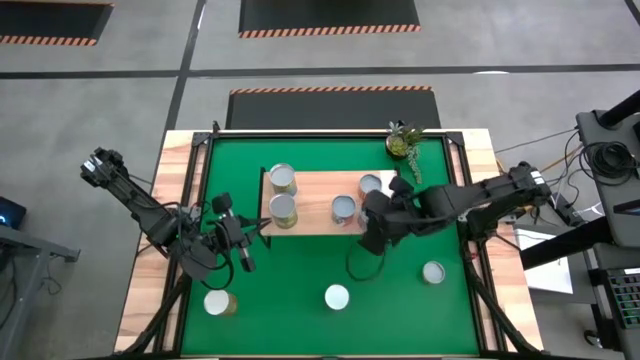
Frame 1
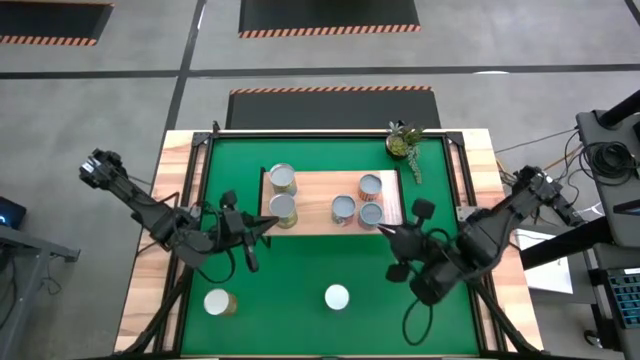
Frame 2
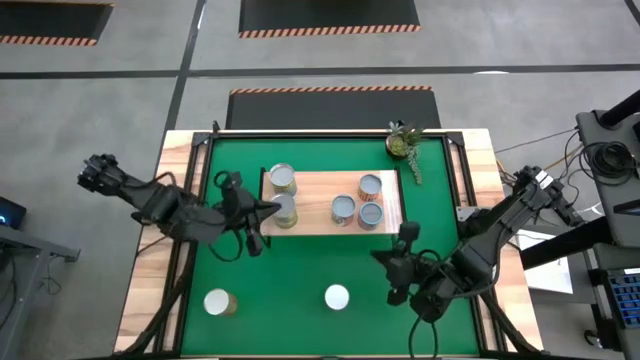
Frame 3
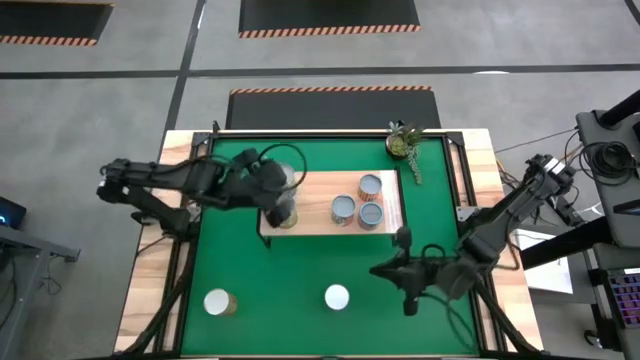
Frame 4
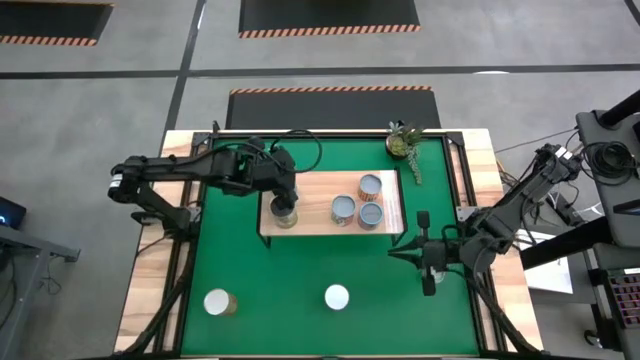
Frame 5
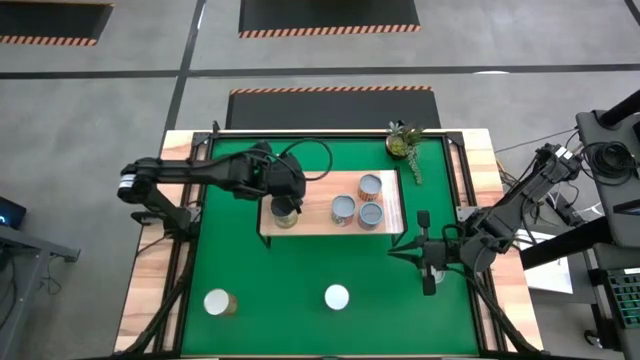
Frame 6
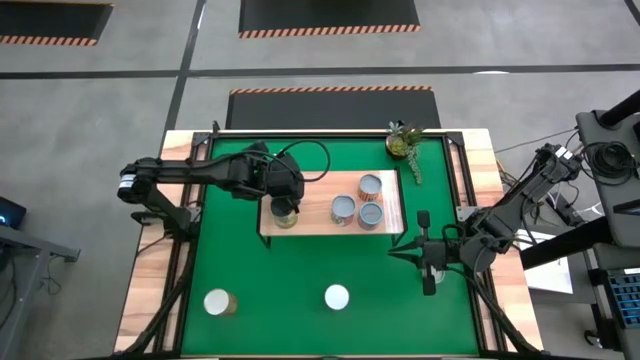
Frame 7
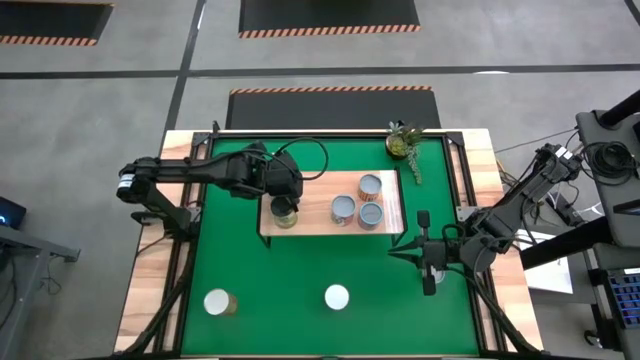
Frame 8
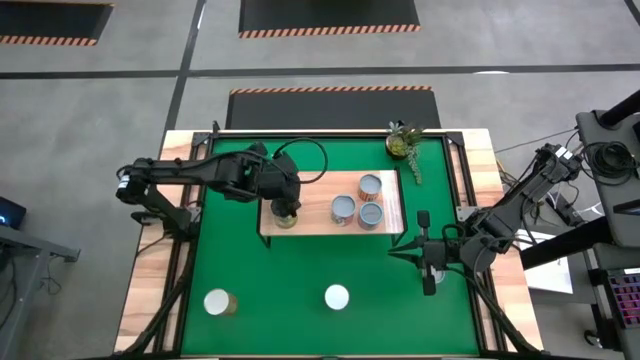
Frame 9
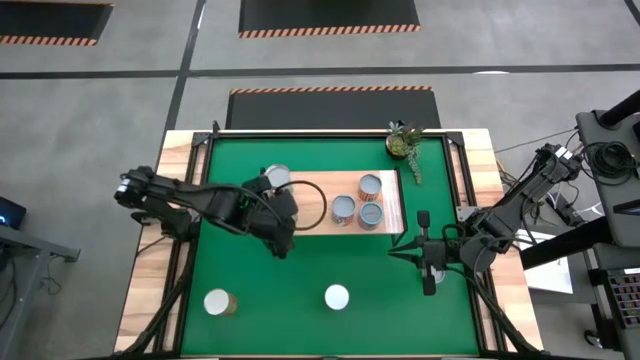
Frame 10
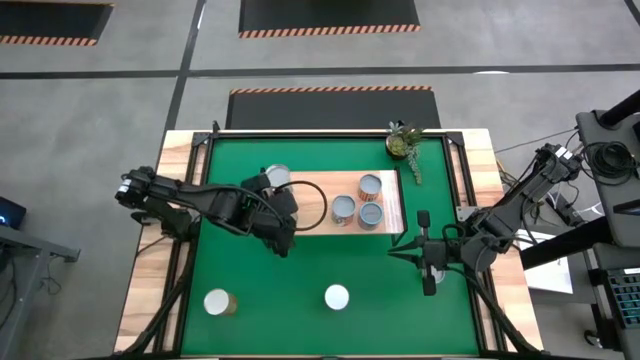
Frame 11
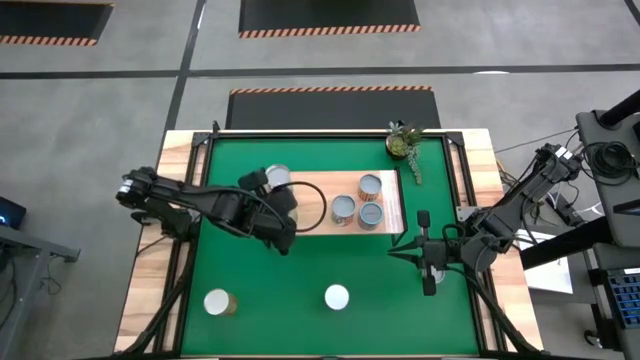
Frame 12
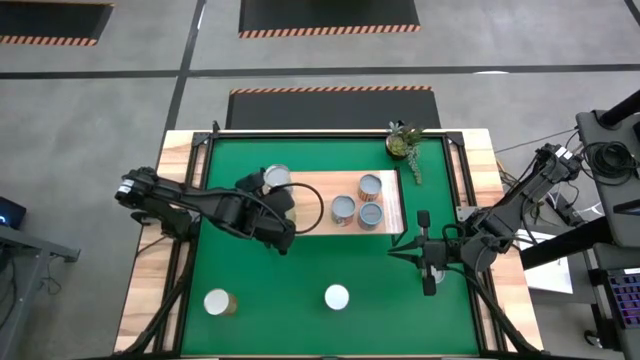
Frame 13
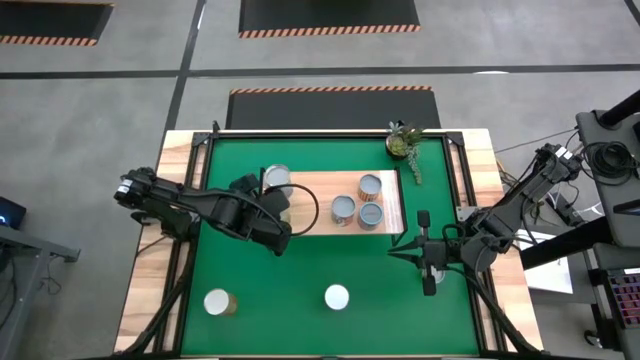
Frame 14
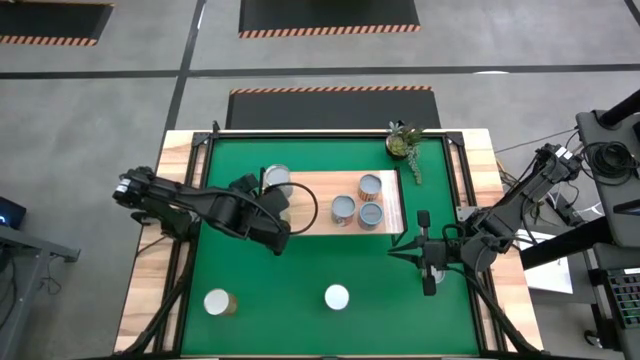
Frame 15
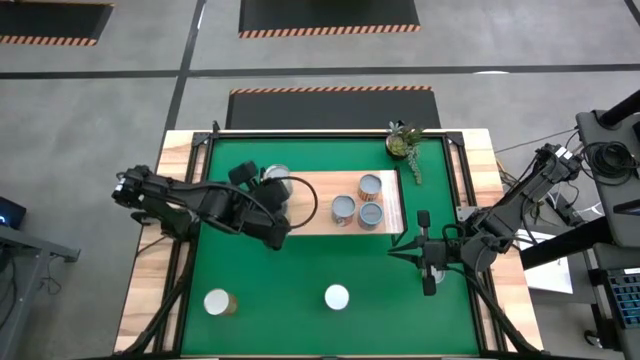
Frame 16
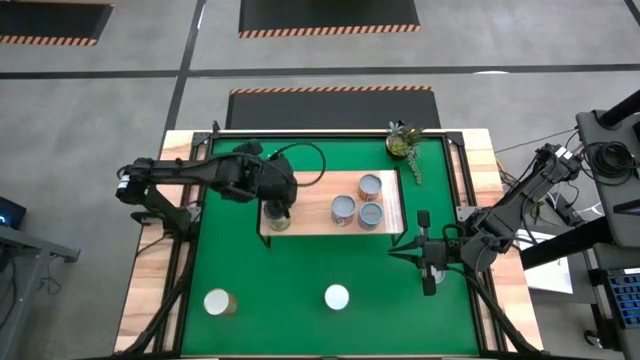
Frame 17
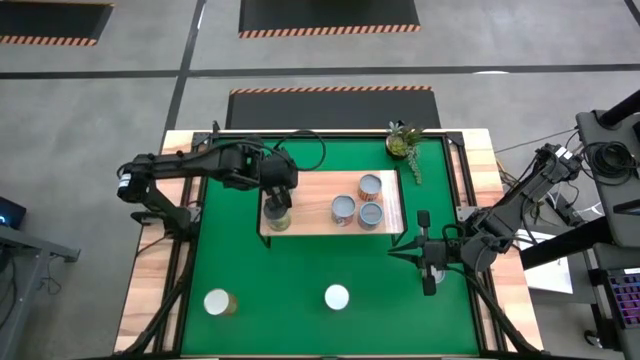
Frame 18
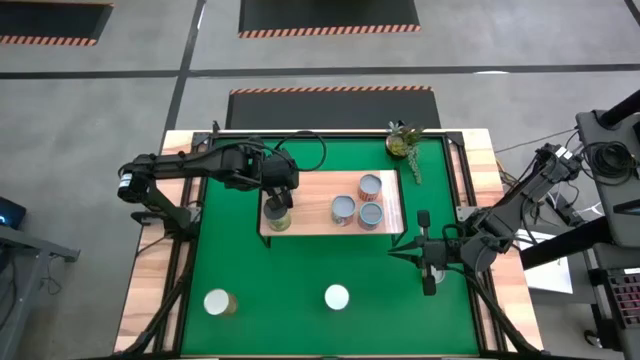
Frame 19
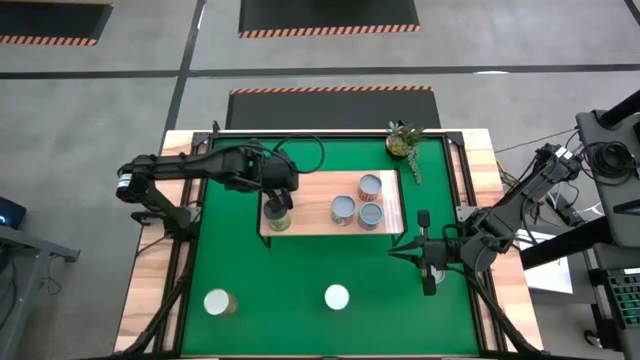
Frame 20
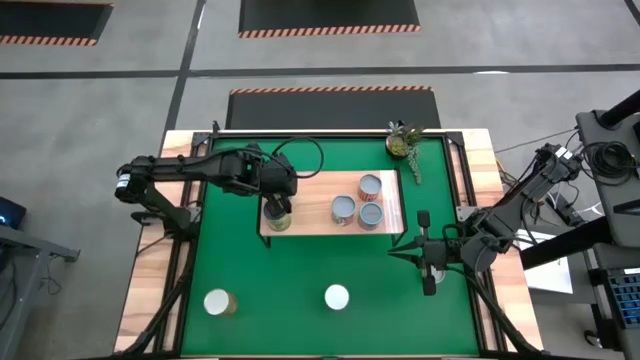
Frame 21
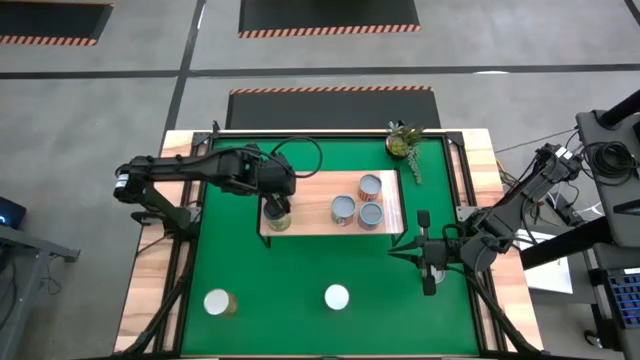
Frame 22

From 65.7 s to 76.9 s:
Task: Pick and place cans onto a shelf
Adjust the cans on the shelf

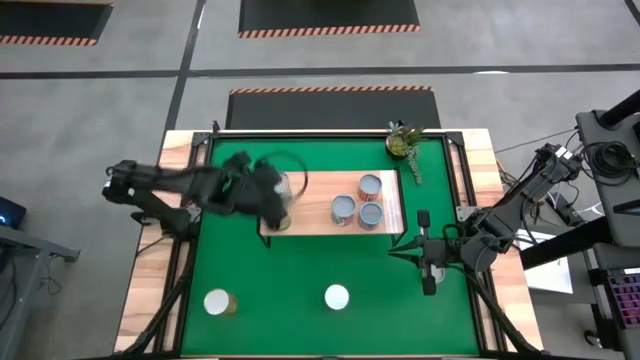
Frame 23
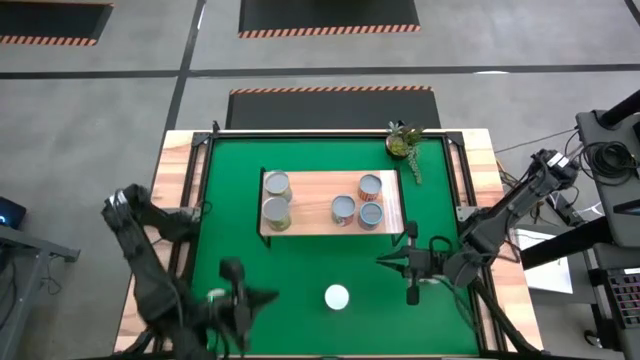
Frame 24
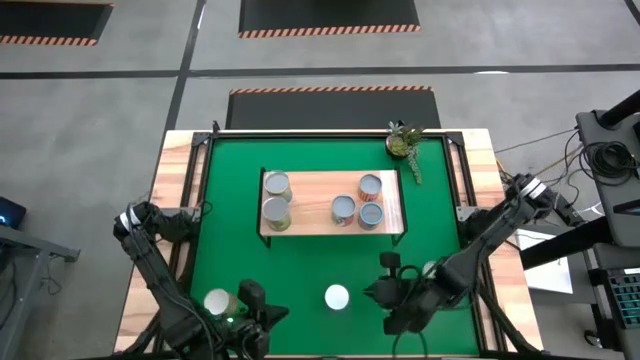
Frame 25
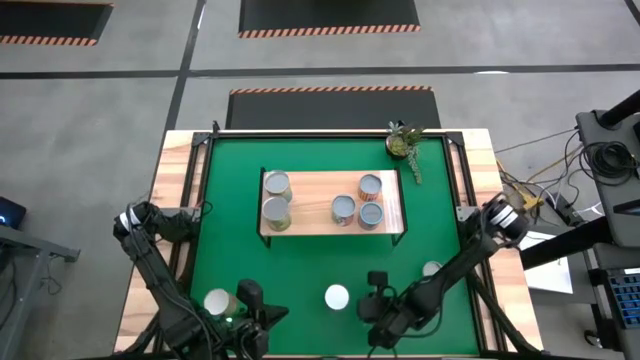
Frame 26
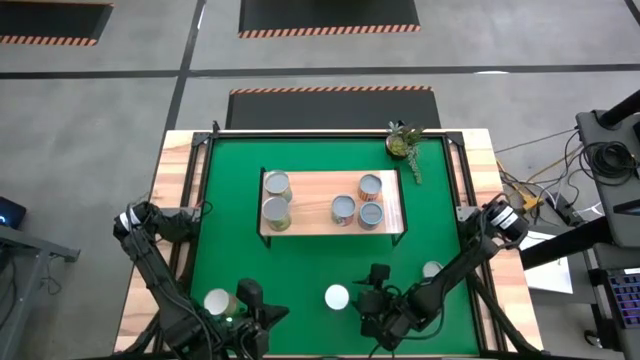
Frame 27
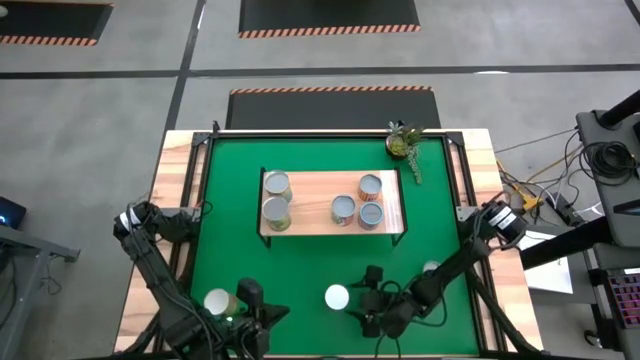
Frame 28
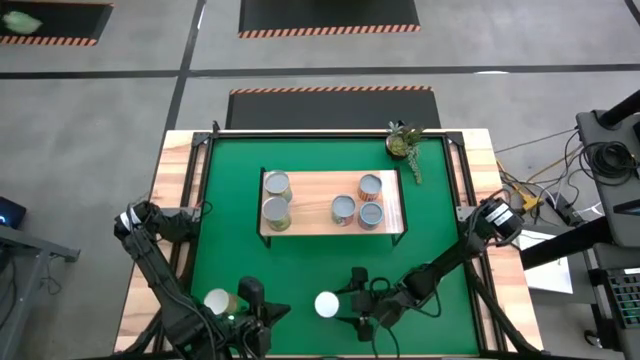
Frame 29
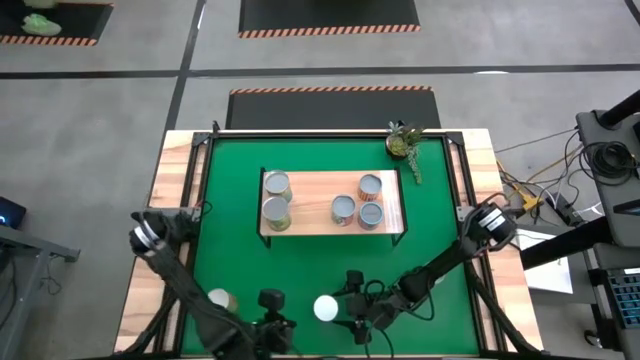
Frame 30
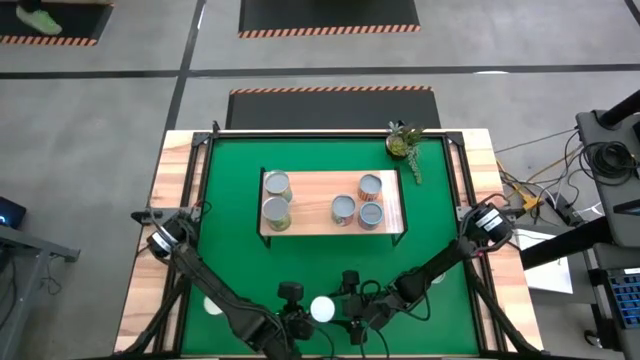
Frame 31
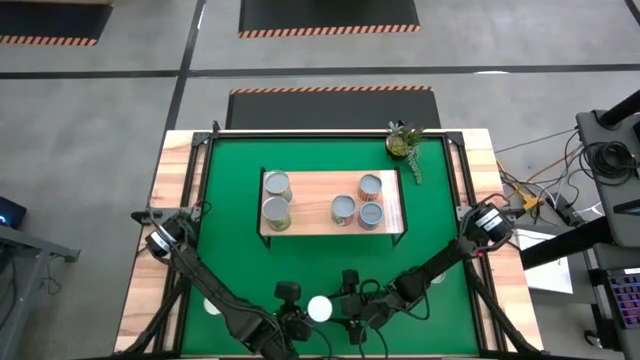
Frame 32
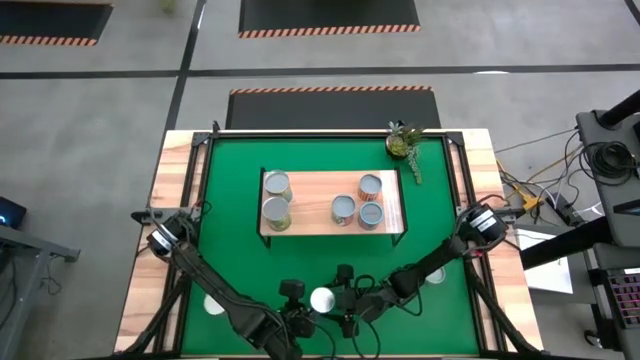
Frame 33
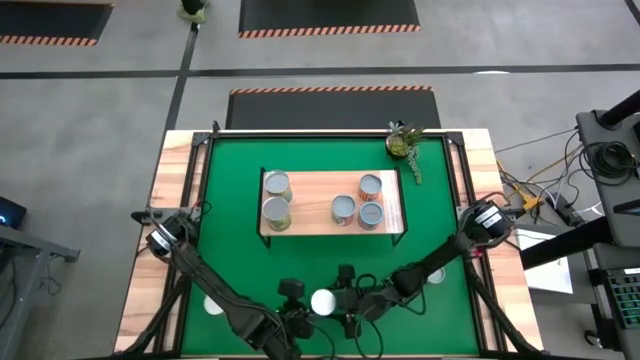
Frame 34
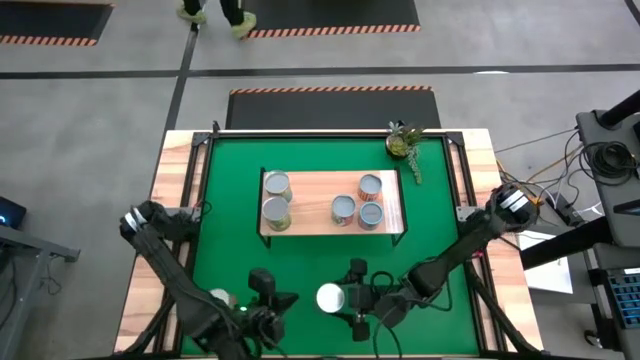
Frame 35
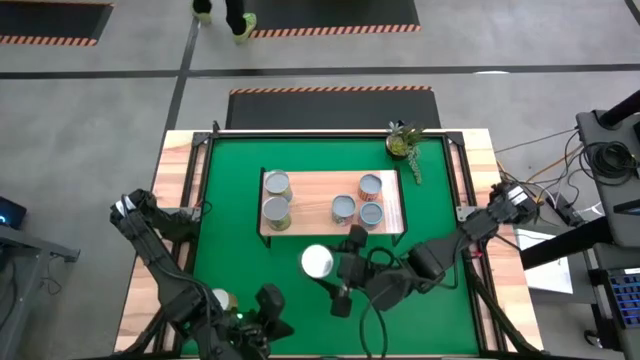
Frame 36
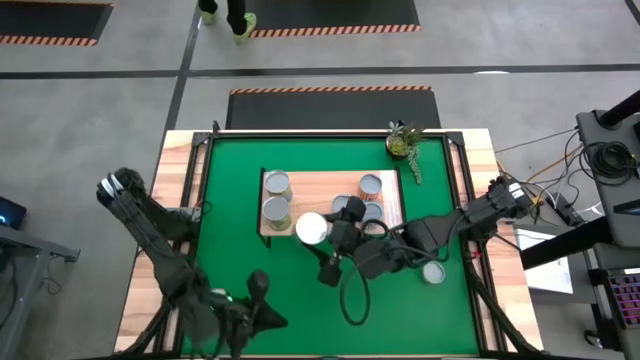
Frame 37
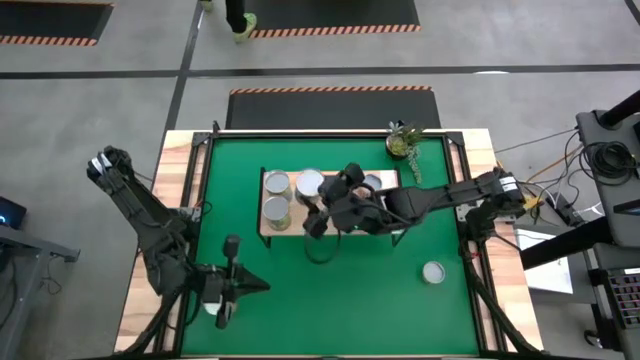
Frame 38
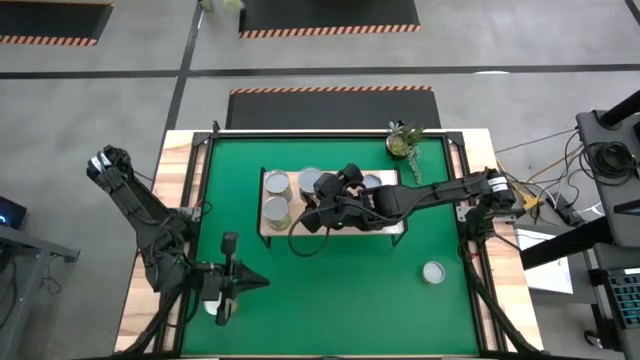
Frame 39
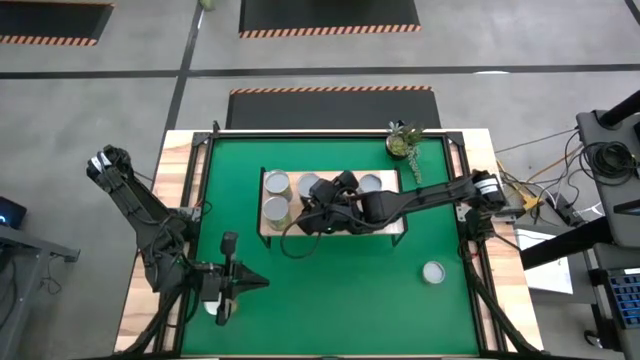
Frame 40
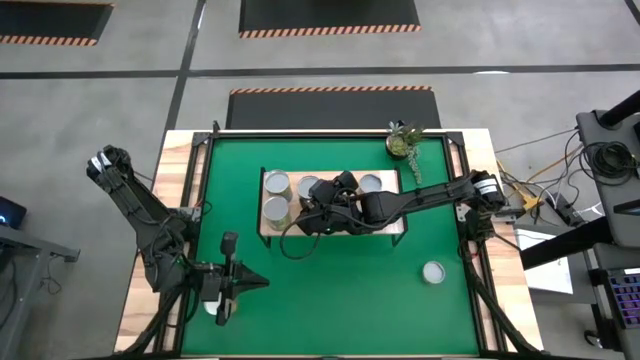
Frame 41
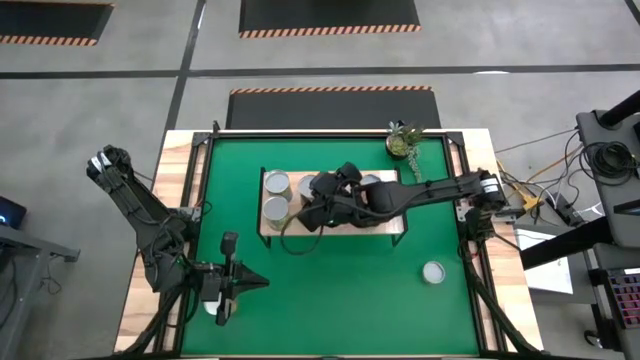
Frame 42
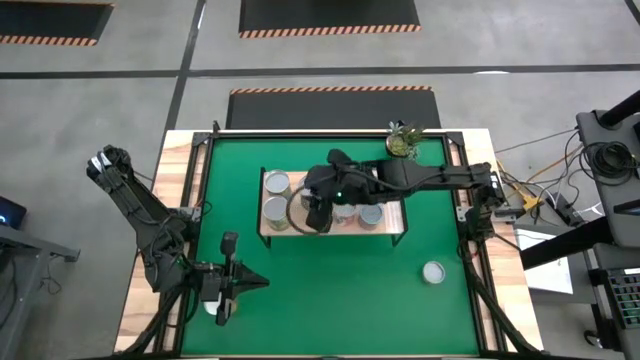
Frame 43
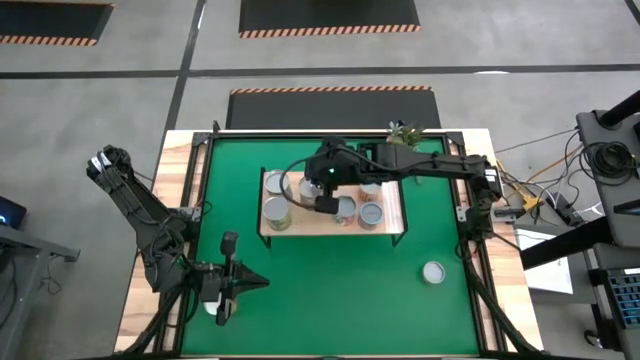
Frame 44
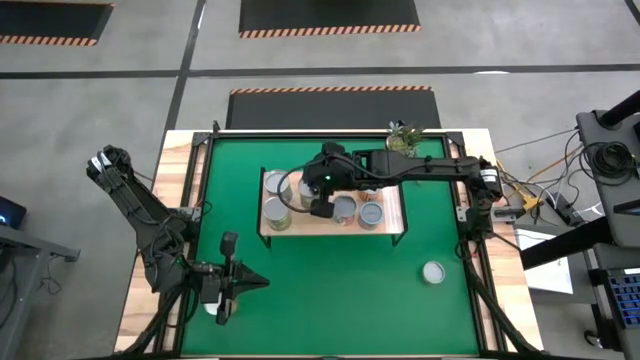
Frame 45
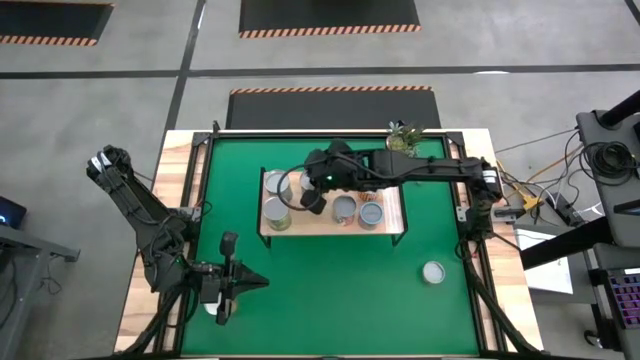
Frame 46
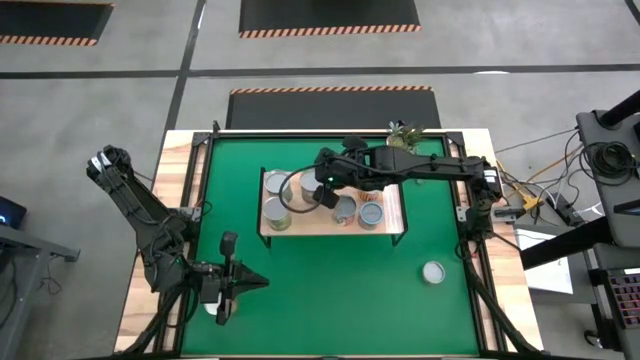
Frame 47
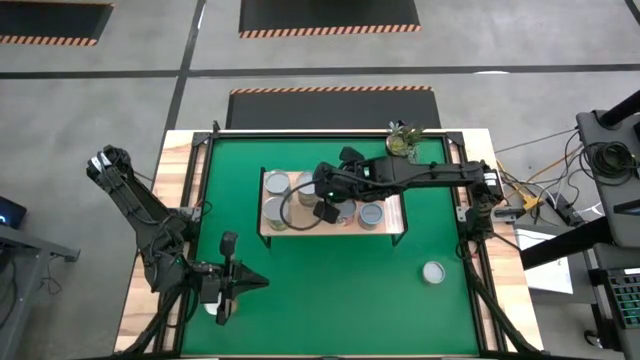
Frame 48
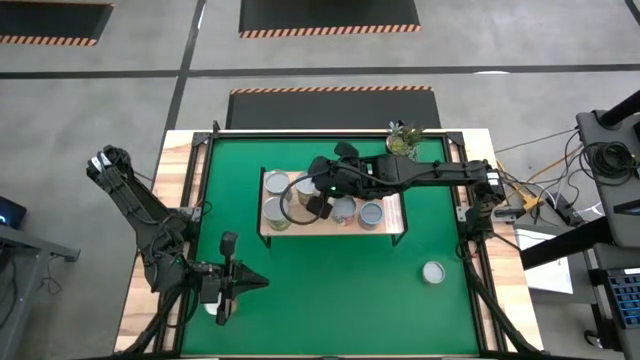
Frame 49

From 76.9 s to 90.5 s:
Put the canned peas on the shelf
